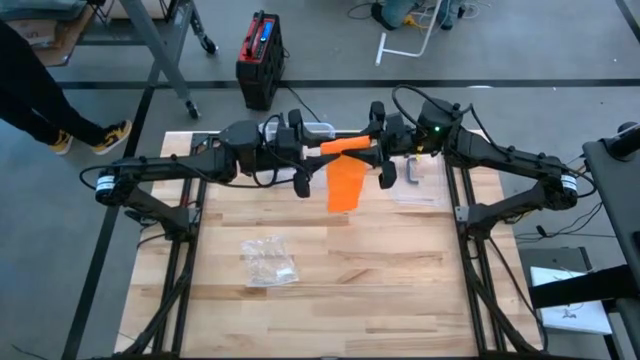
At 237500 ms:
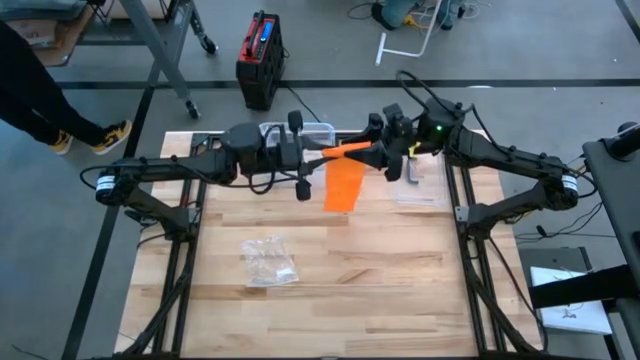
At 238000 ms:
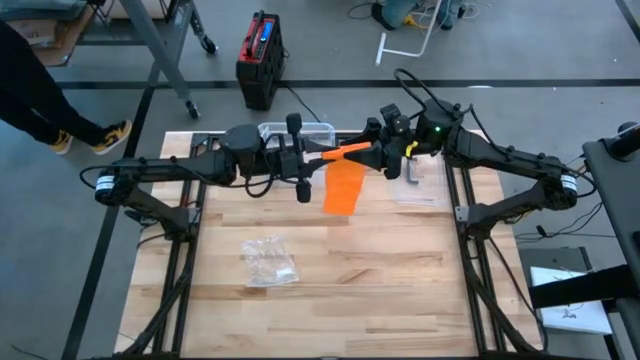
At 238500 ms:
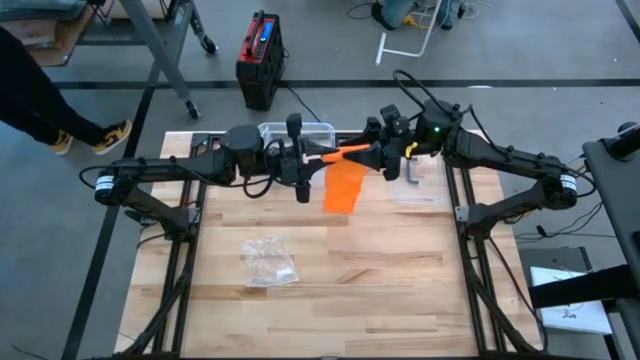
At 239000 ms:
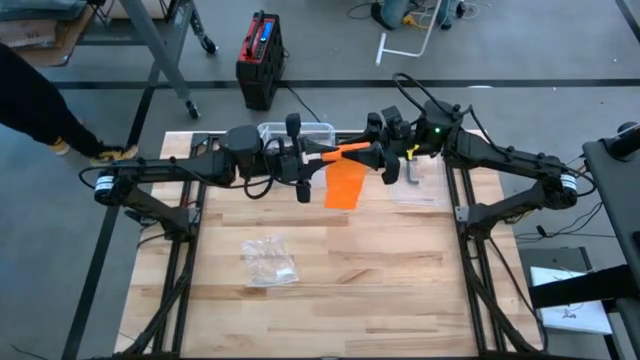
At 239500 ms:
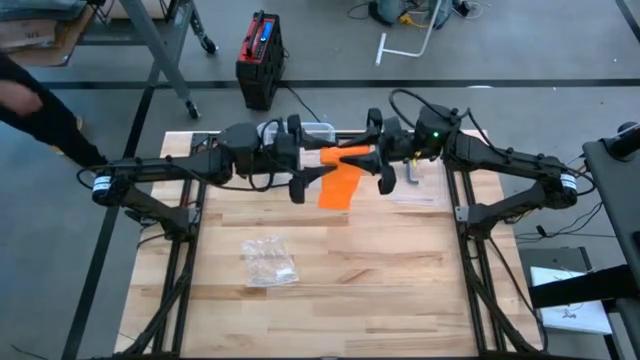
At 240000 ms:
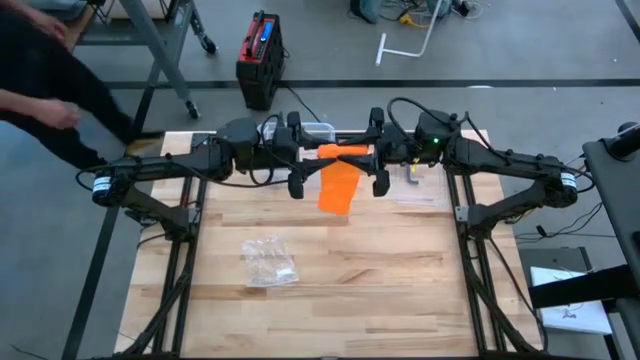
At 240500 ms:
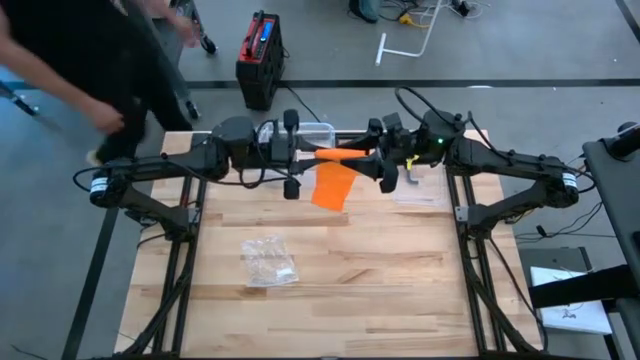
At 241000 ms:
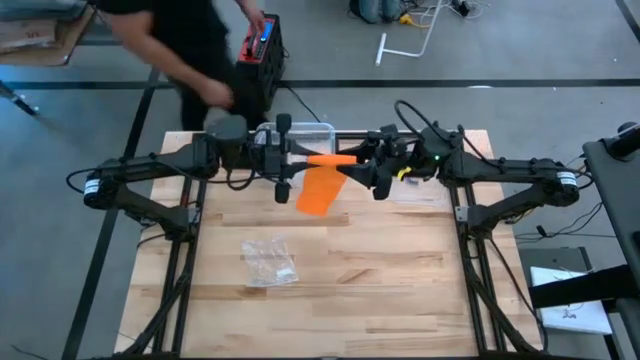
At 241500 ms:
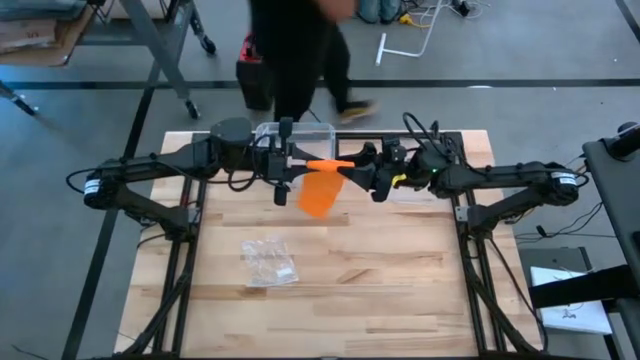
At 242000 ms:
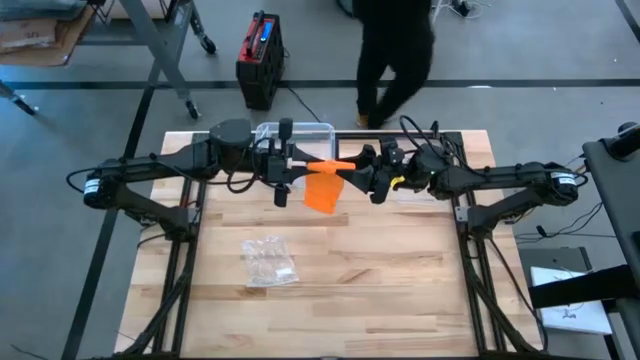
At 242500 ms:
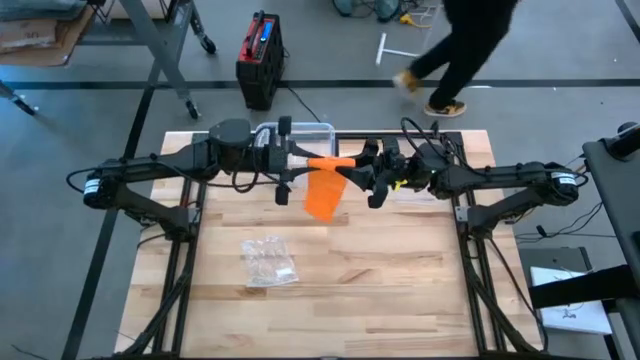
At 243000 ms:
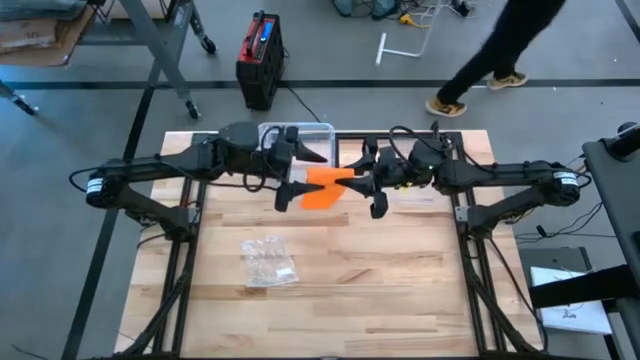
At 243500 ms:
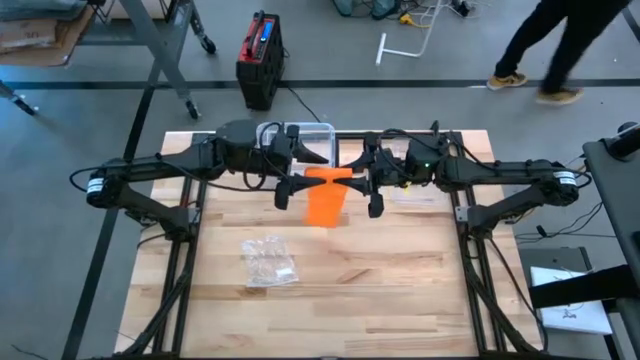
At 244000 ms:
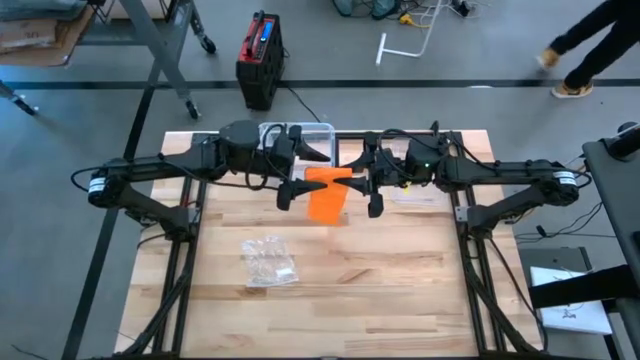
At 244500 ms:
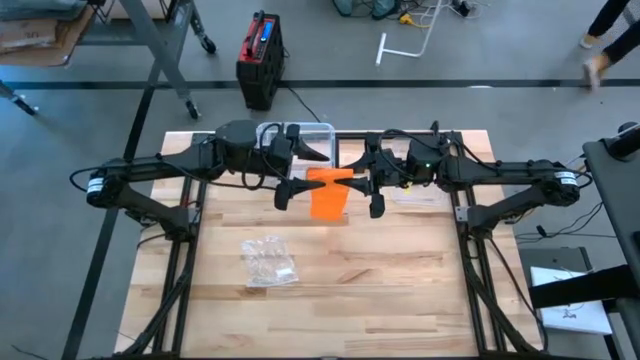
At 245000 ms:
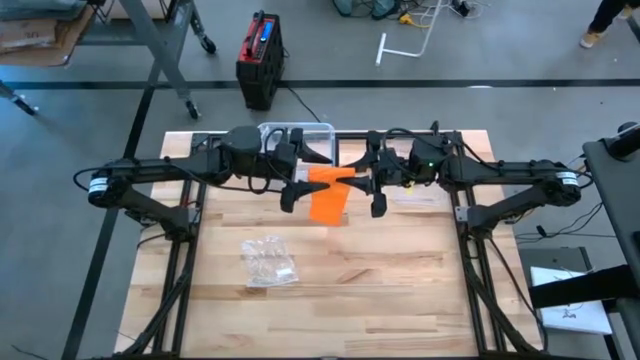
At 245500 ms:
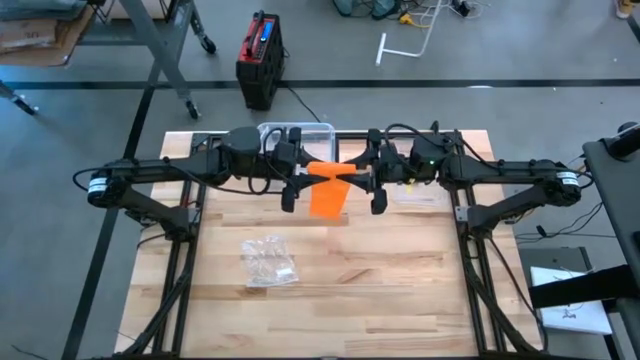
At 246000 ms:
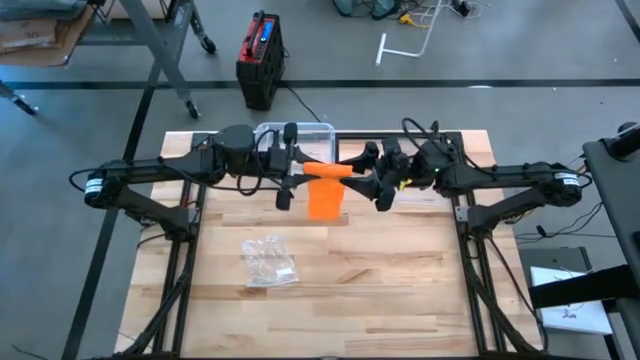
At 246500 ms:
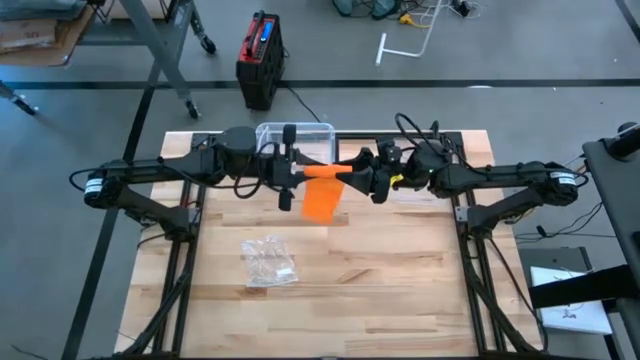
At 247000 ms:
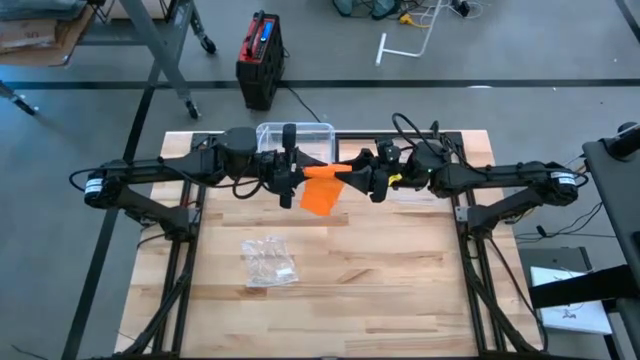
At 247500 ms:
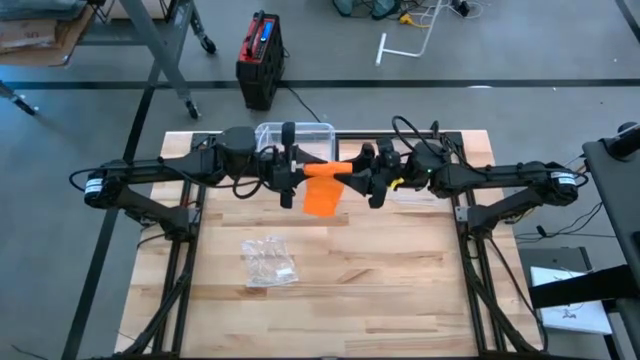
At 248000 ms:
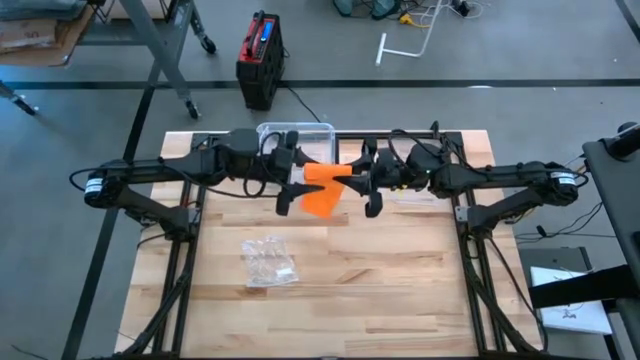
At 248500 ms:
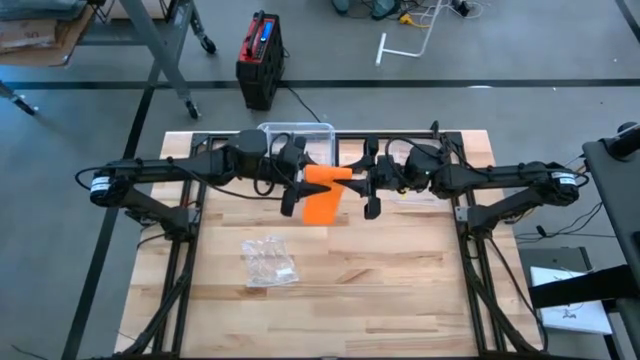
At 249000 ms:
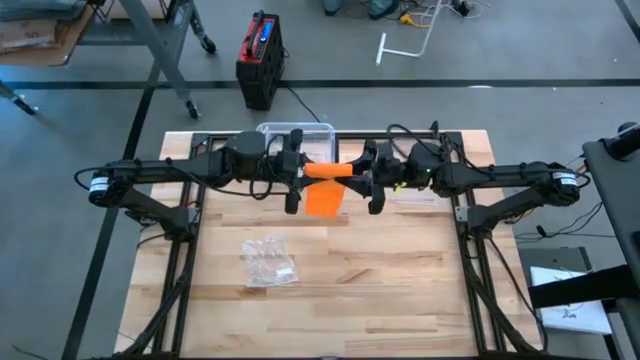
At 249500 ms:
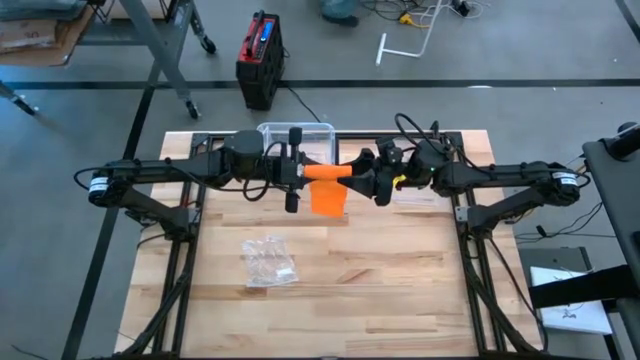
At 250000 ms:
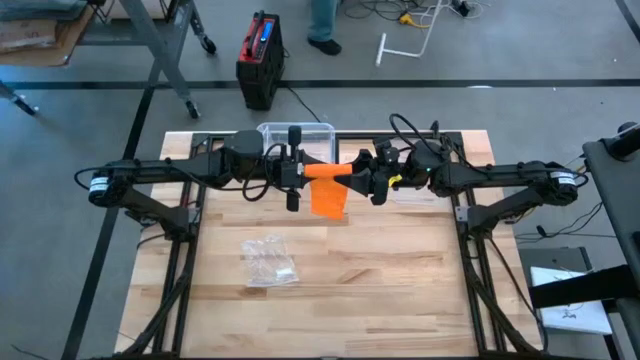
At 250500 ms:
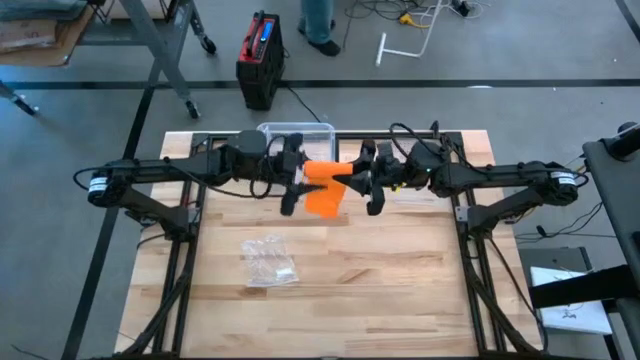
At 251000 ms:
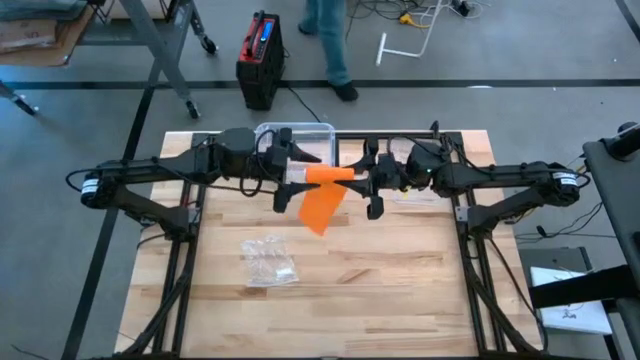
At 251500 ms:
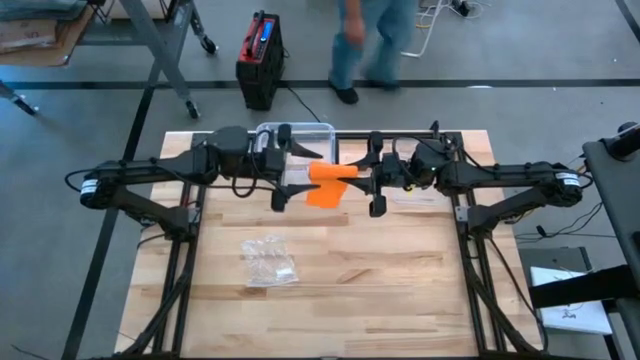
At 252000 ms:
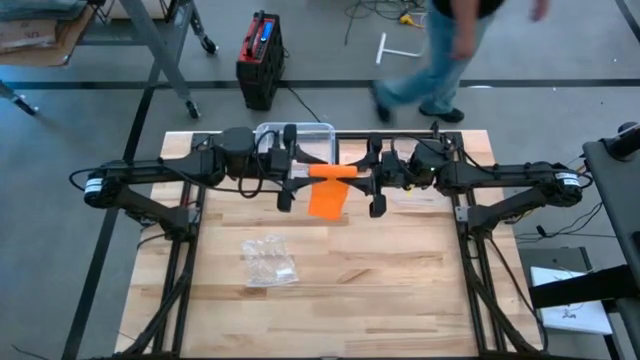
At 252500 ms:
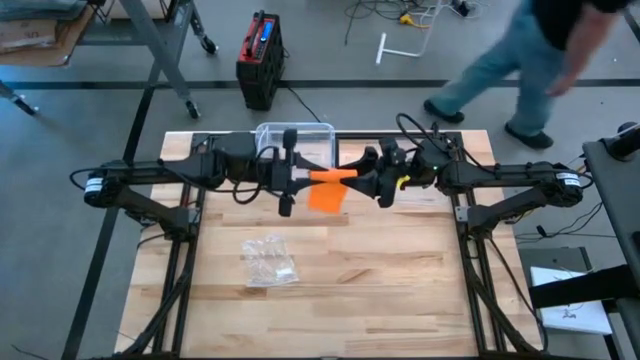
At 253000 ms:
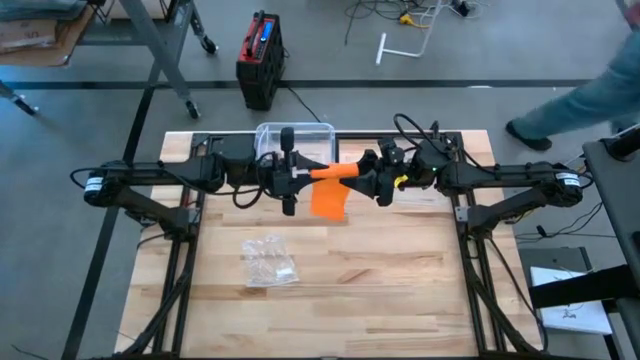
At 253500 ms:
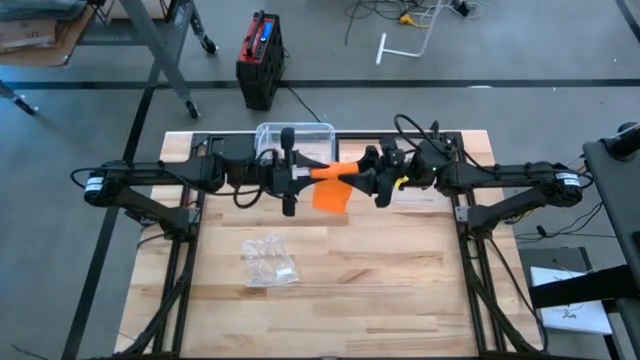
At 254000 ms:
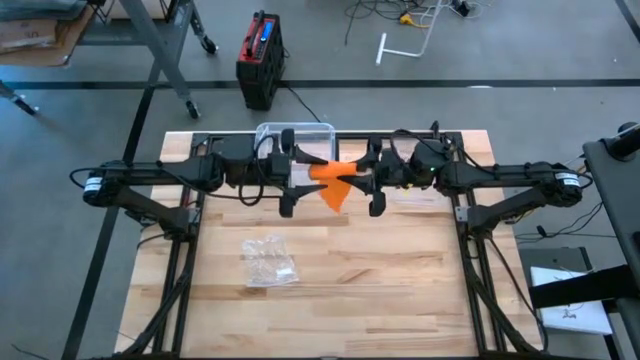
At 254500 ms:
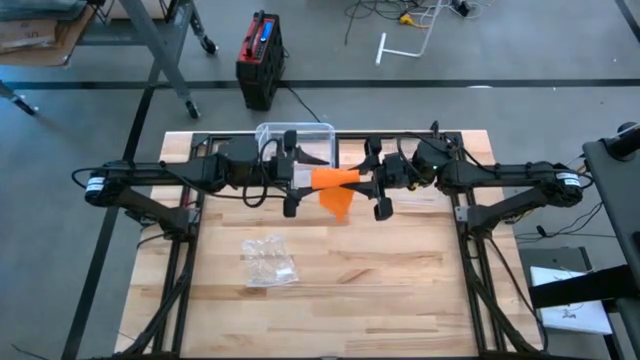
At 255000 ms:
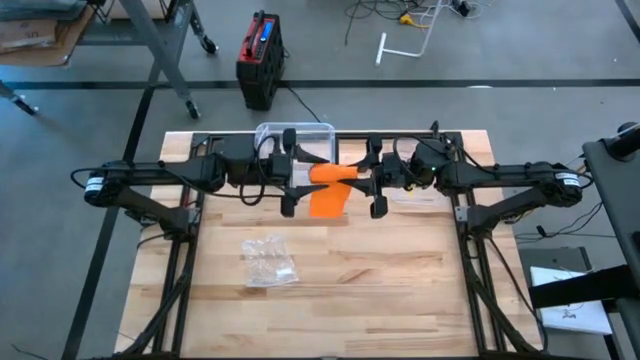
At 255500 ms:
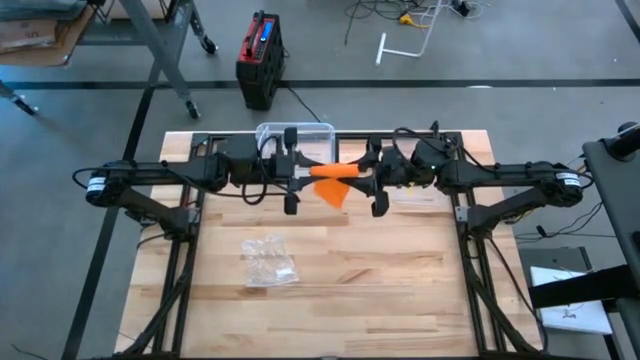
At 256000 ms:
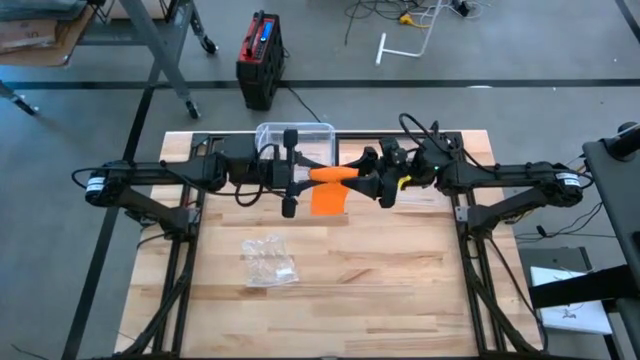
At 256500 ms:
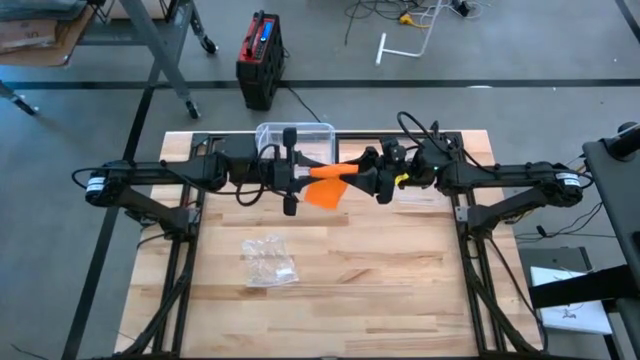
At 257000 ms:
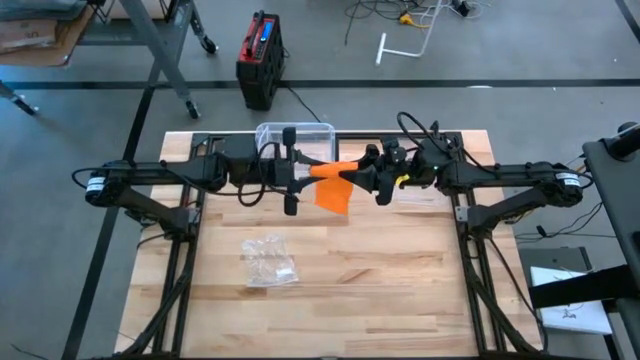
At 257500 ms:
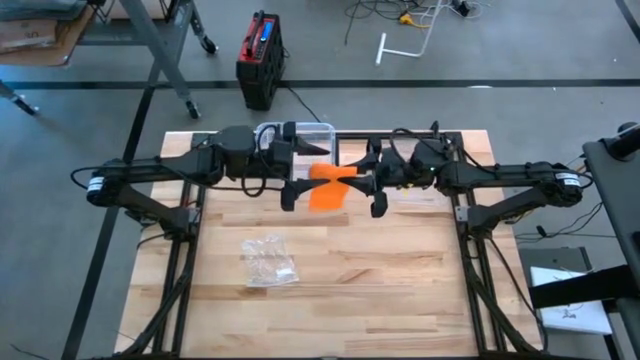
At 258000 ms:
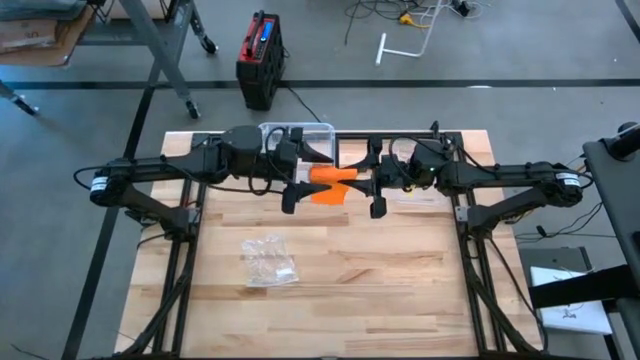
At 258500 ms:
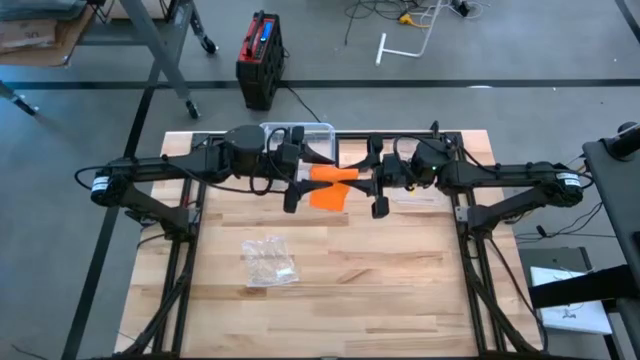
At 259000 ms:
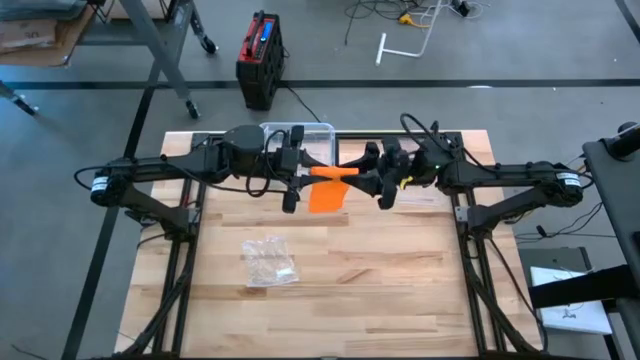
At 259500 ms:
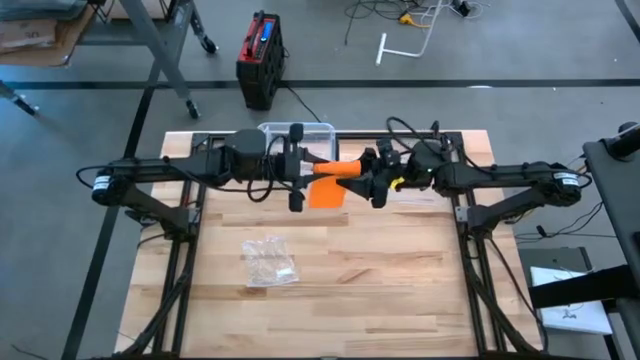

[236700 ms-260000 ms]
Task: Roll bandage
Roll the orange bandage
